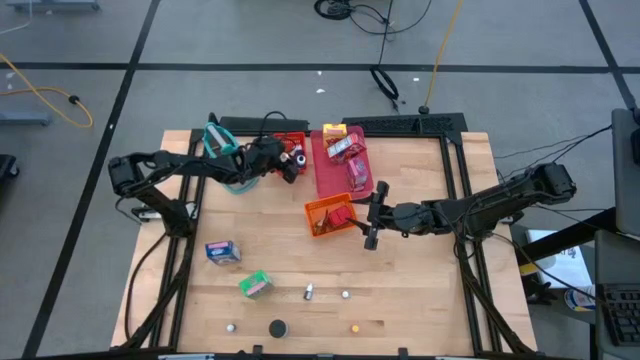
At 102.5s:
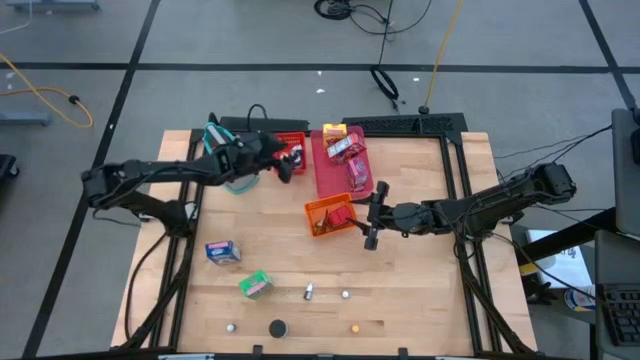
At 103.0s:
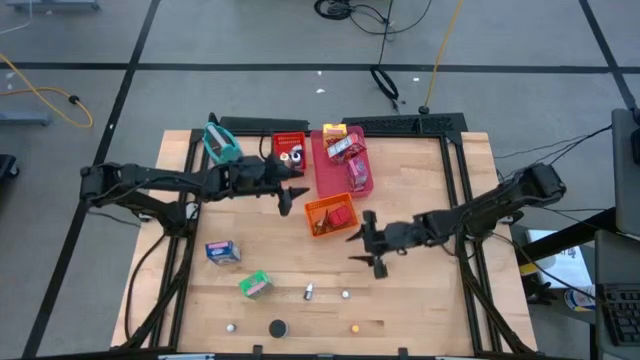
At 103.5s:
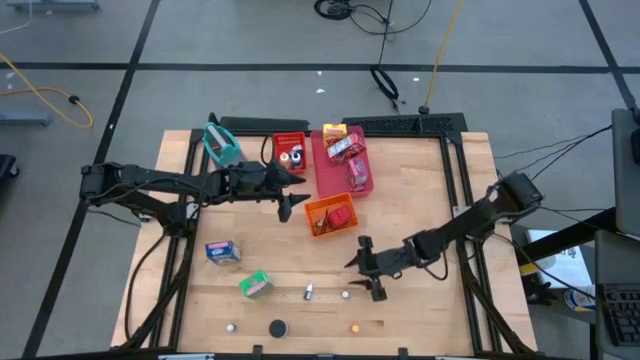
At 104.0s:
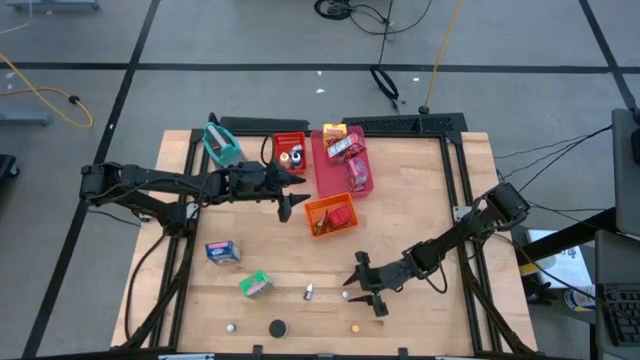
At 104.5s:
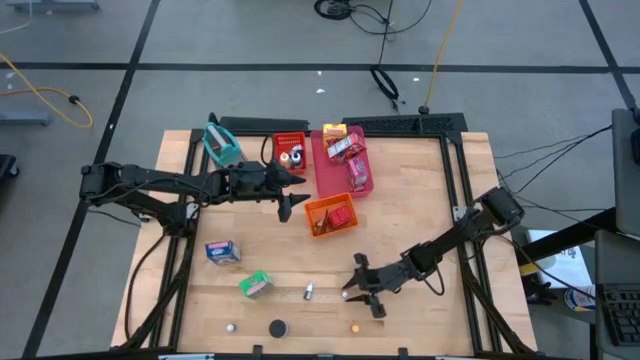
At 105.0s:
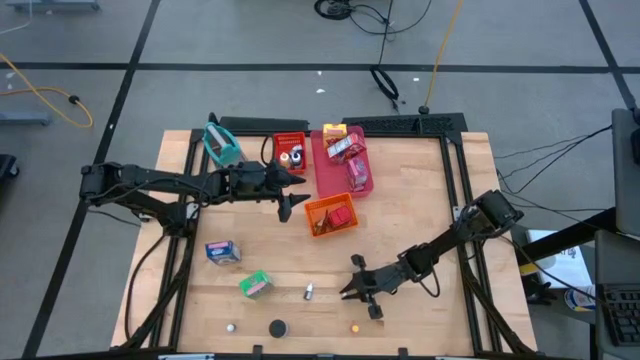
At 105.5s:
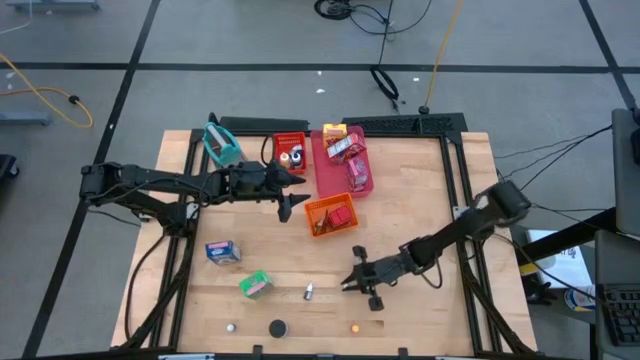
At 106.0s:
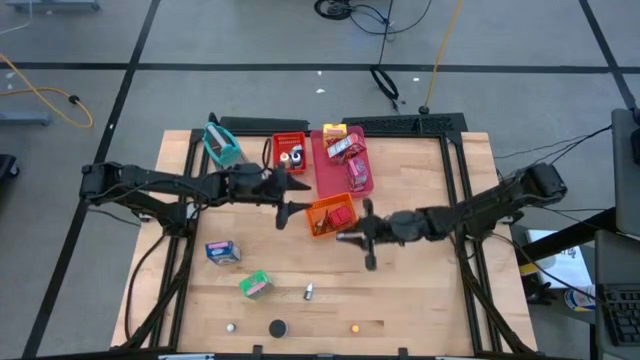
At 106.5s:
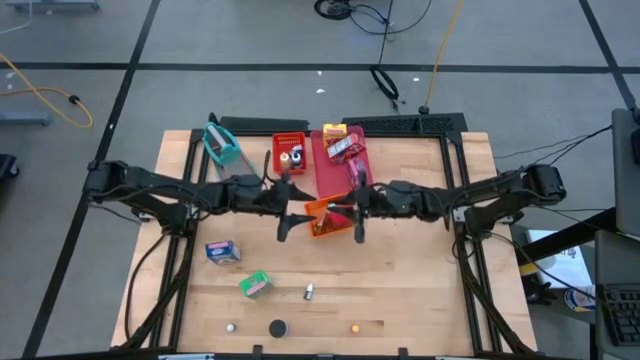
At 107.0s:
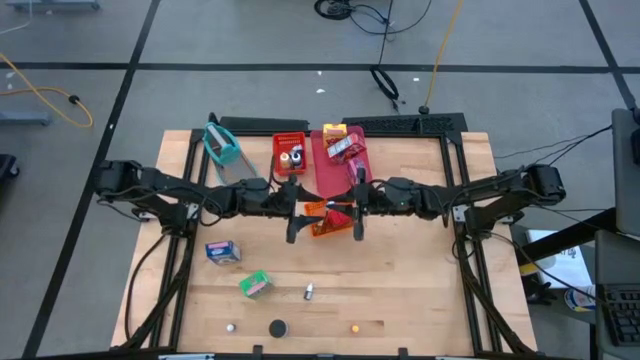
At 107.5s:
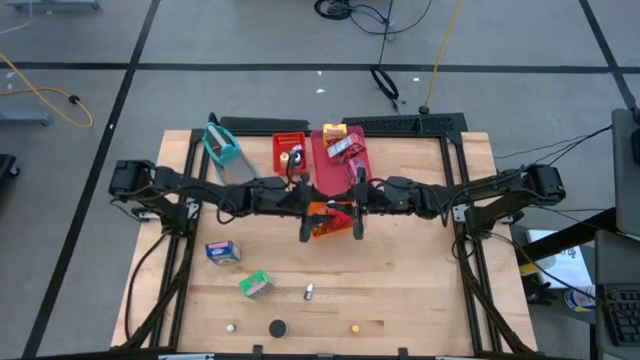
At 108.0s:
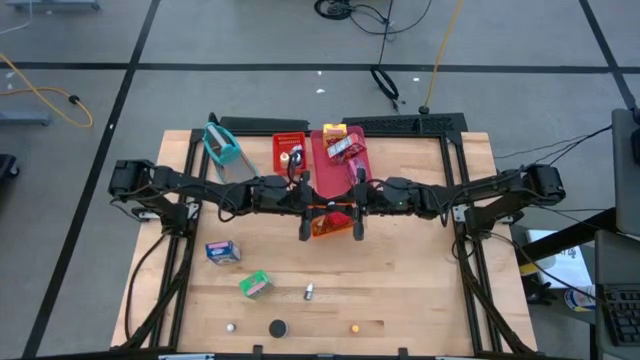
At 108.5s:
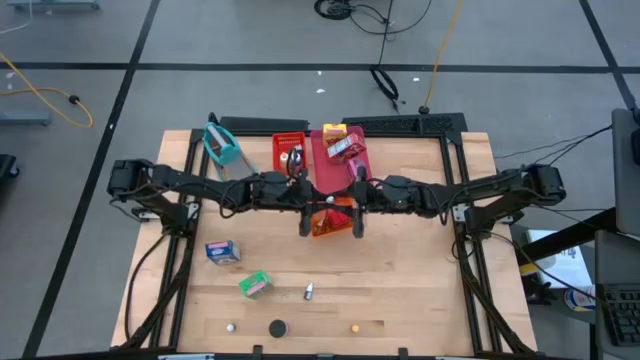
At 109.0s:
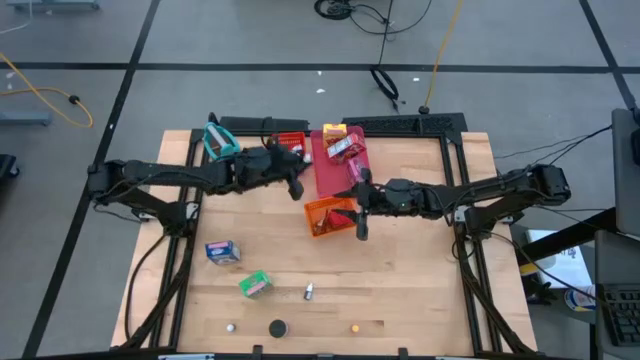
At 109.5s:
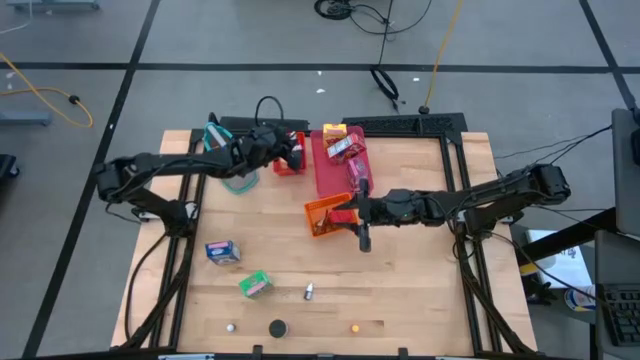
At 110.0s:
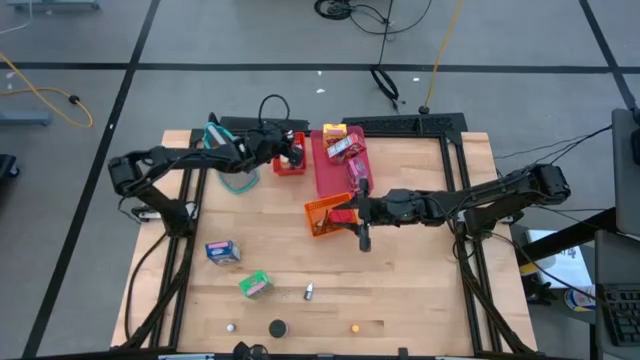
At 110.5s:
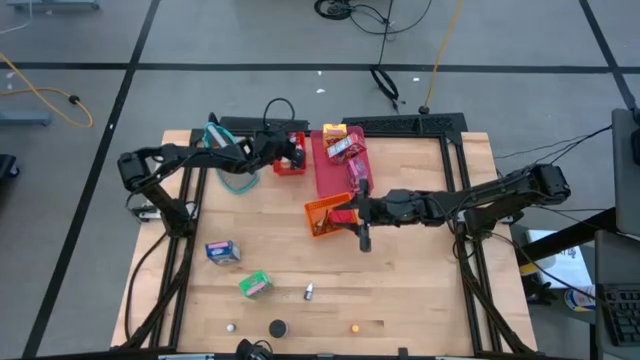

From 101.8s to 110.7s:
Task: Pick & Place Kitchen Items
Put the right brown food coloring bottle into the red bin

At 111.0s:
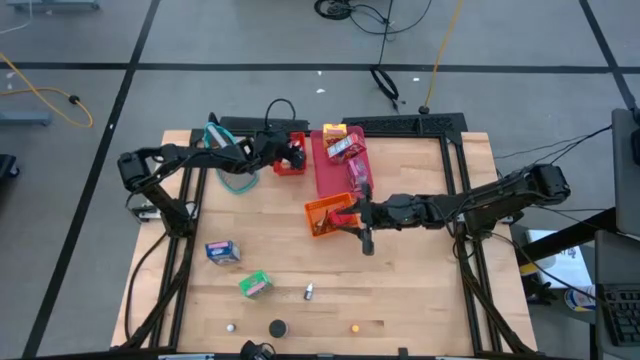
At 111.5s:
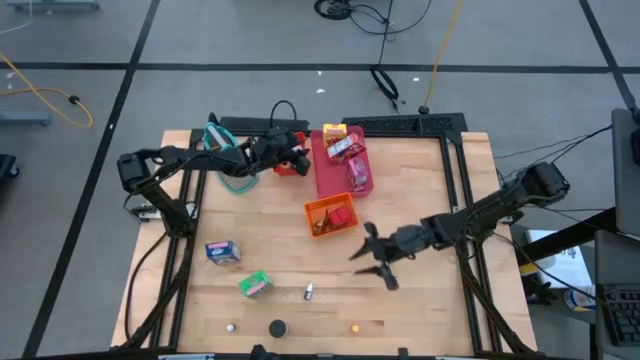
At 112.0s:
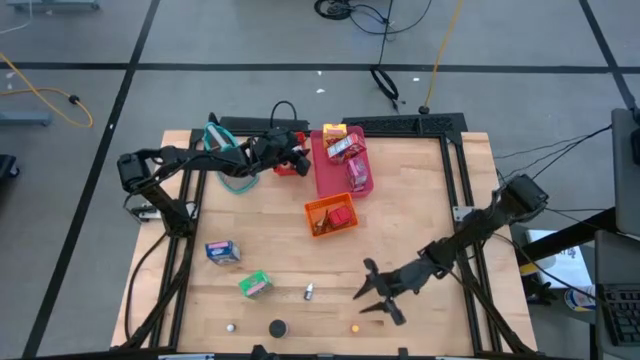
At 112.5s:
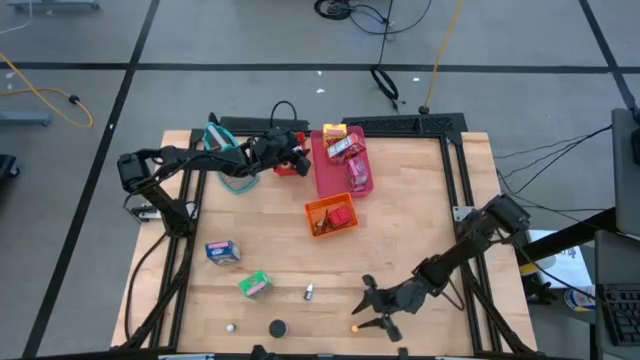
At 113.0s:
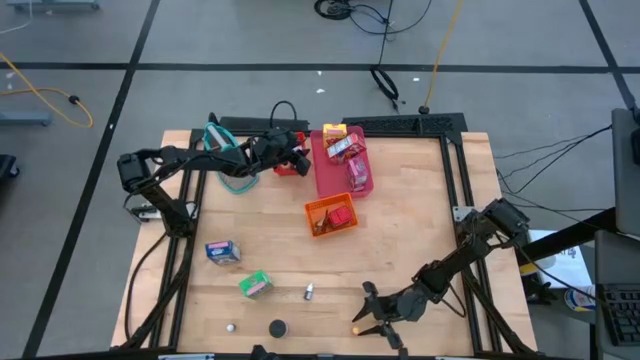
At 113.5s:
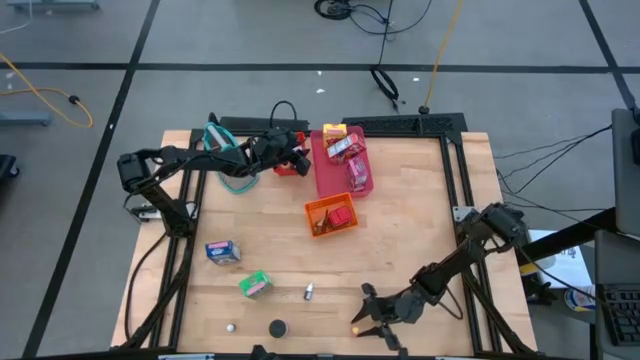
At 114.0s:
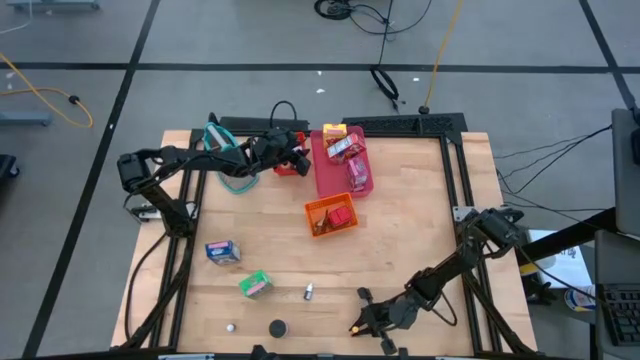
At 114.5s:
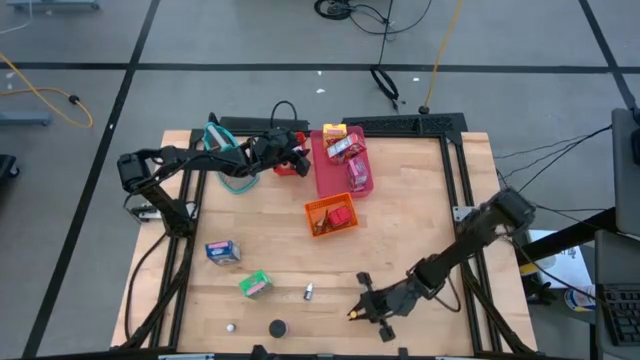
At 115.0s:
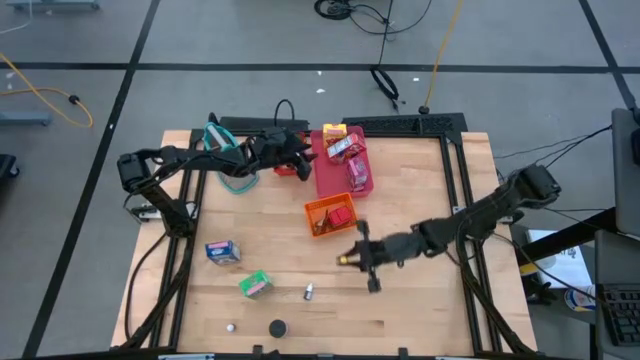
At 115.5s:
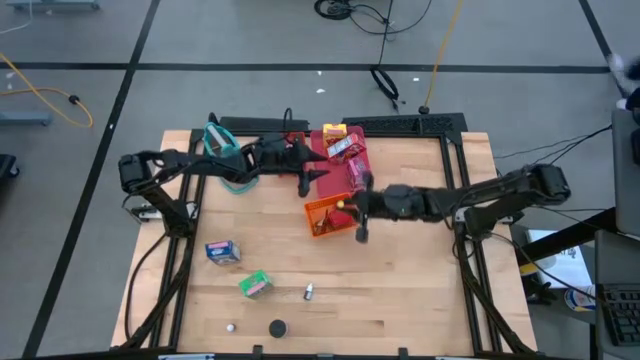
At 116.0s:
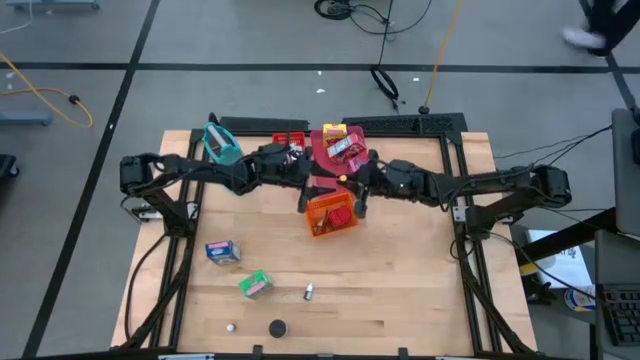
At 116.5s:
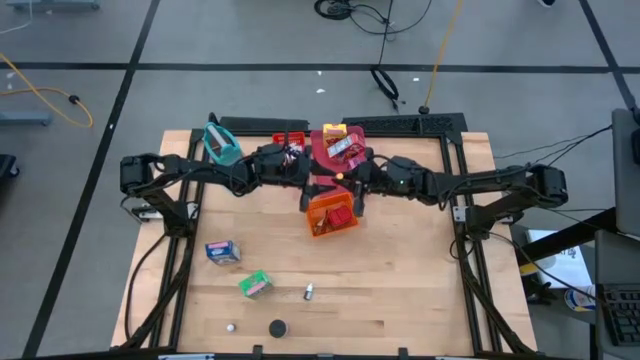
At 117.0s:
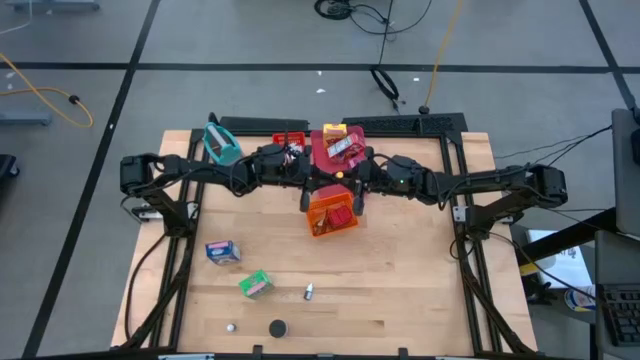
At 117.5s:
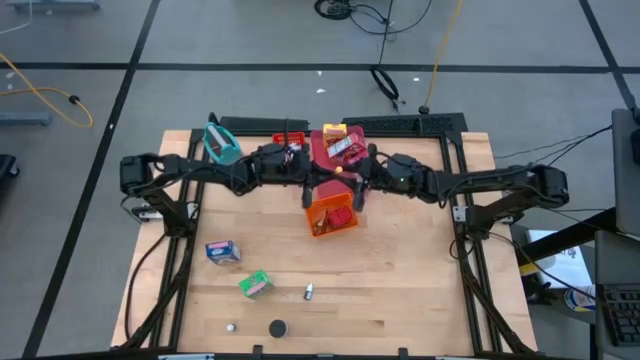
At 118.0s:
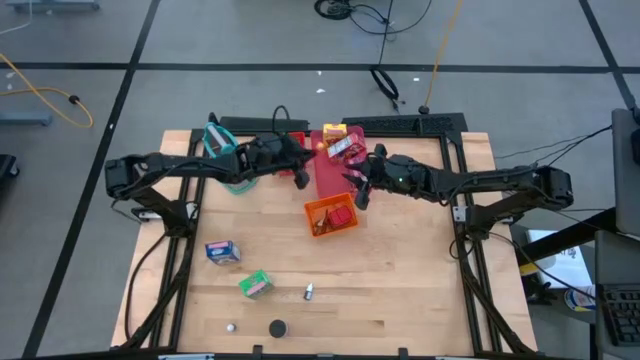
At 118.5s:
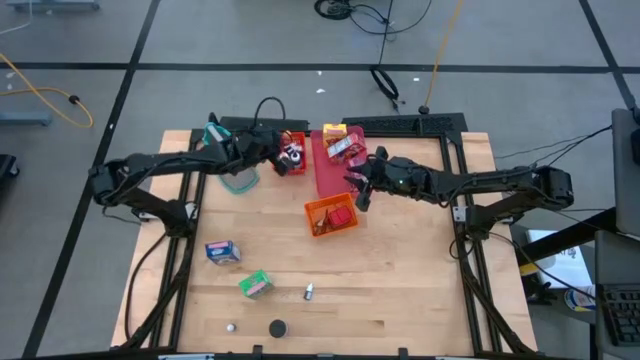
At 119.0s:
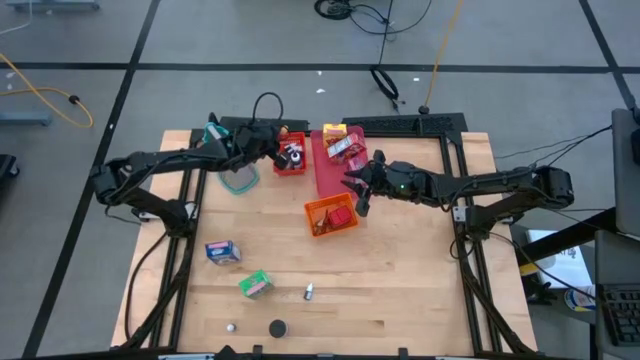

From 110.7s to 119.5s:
Put the orange food coloring bottle into the red bin

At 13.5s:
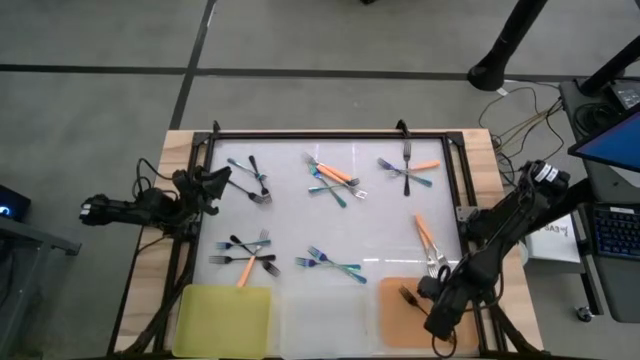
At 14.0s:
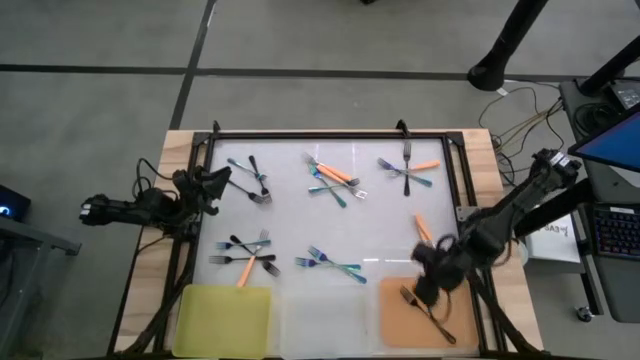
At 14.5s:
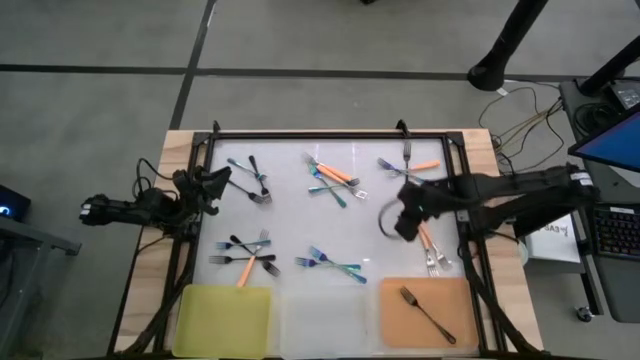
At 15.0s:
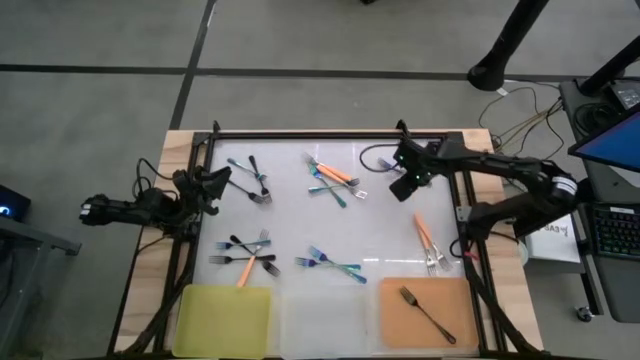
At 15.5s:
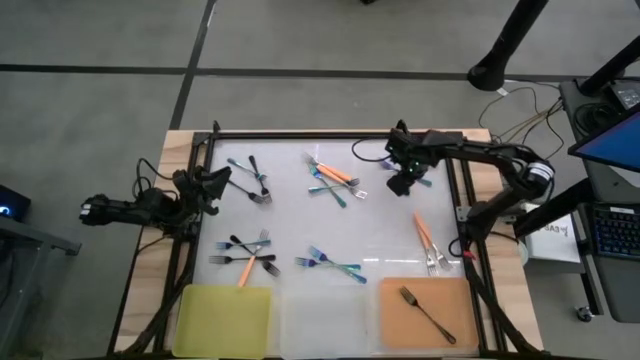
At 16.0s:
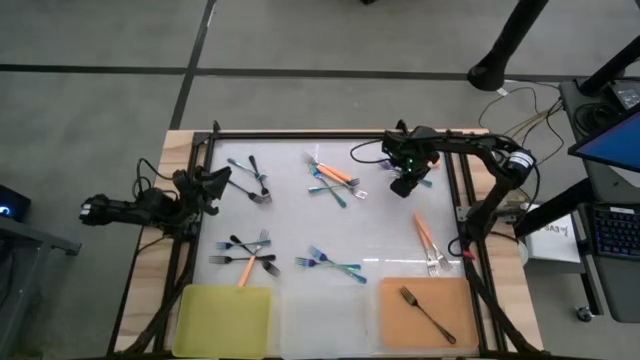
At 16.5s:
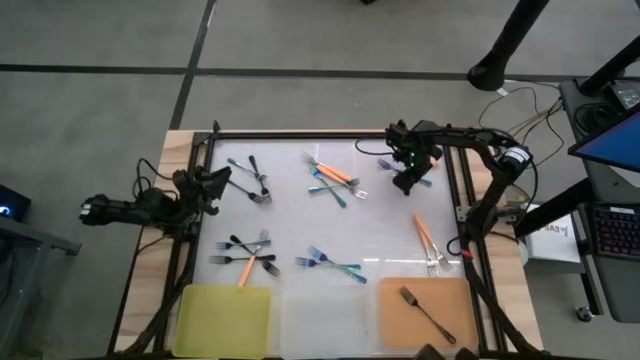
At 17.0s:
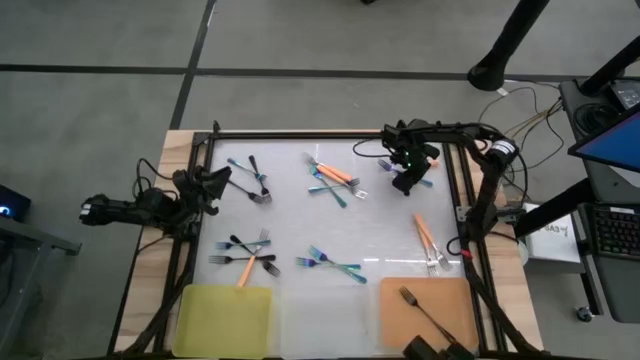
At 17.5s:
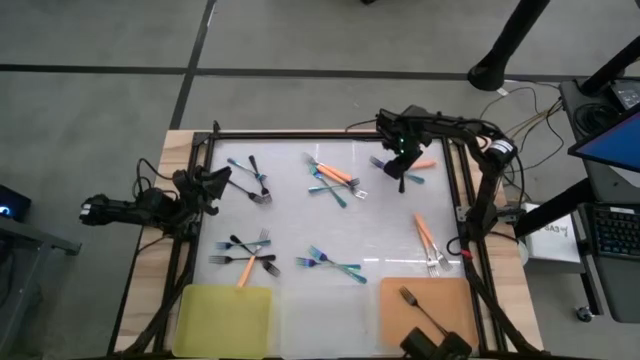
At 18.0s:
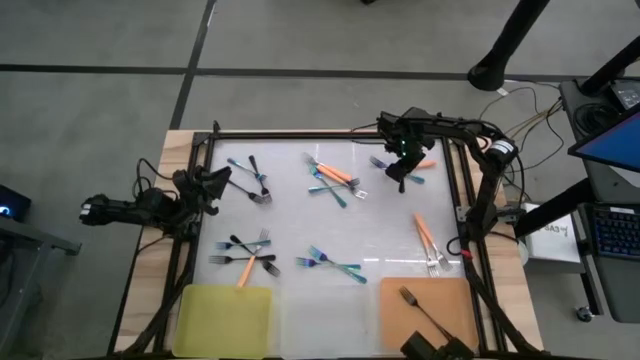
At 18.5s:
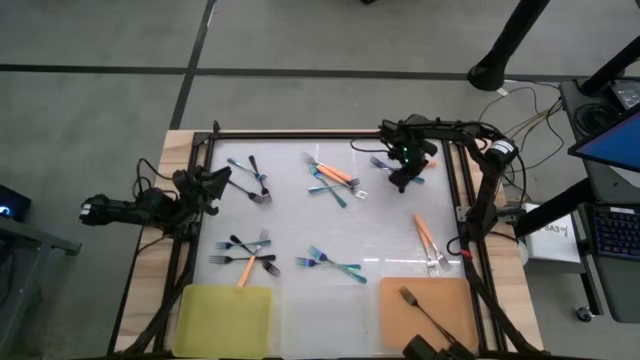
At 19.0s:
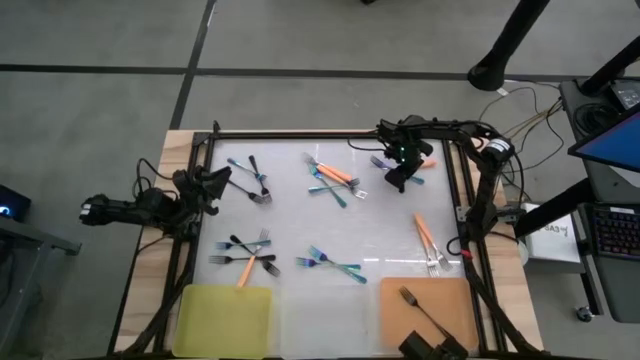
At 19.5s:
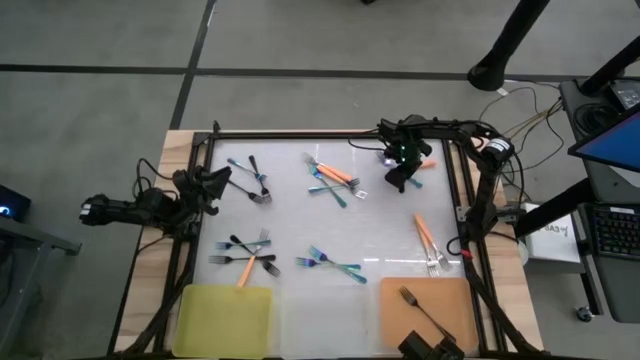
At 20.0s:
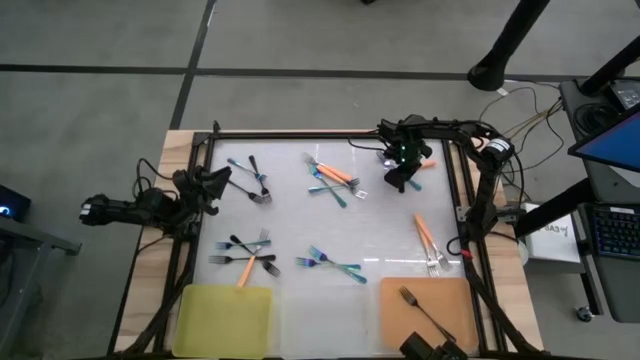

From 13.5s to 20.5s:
Task: Sort silverware by color (type)
Put the blue fork into the yellow bin
